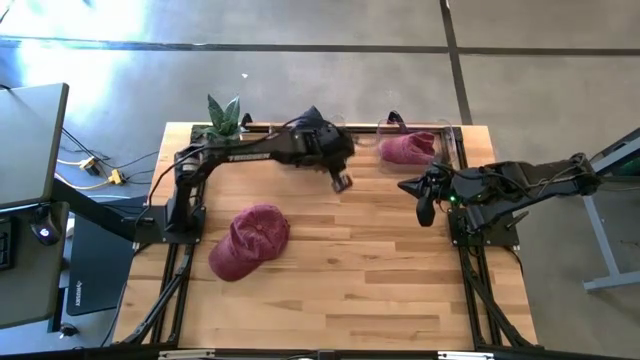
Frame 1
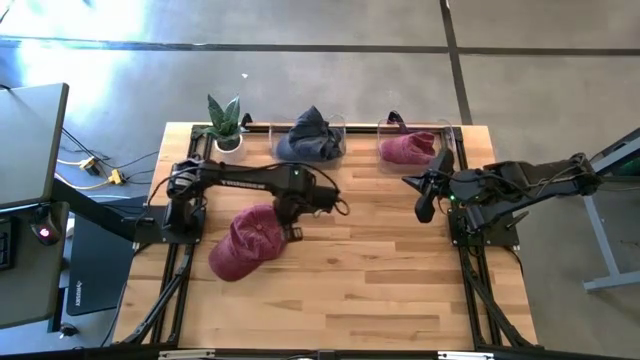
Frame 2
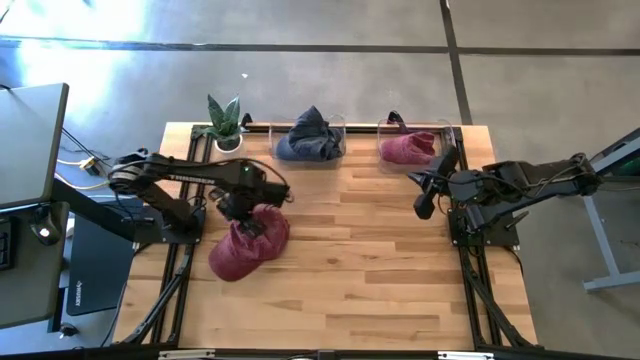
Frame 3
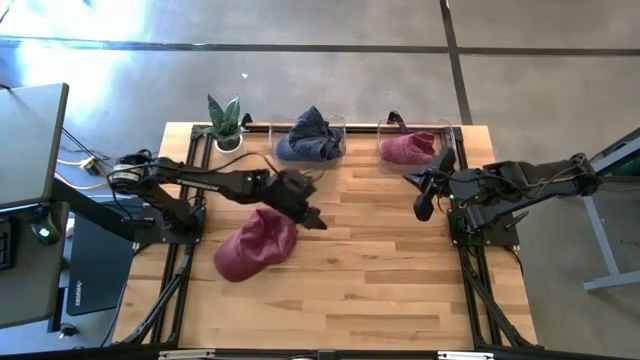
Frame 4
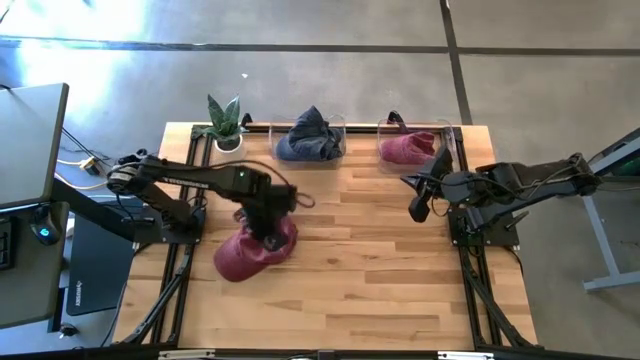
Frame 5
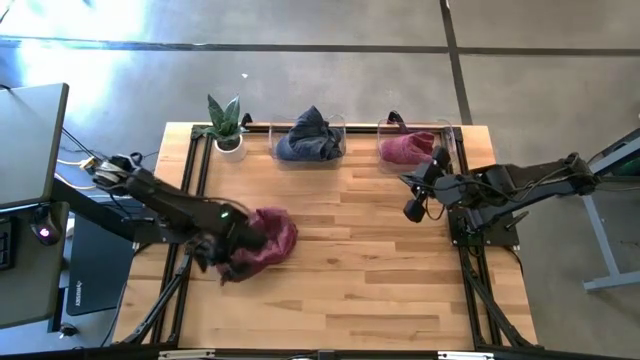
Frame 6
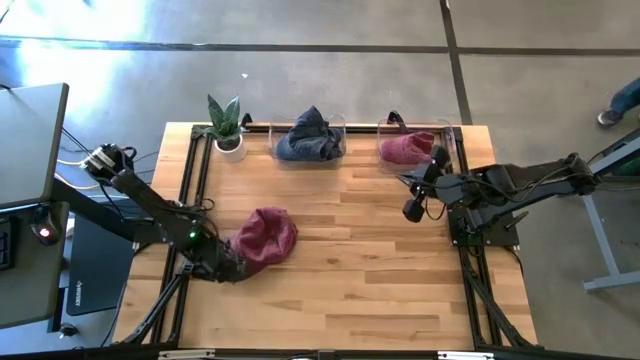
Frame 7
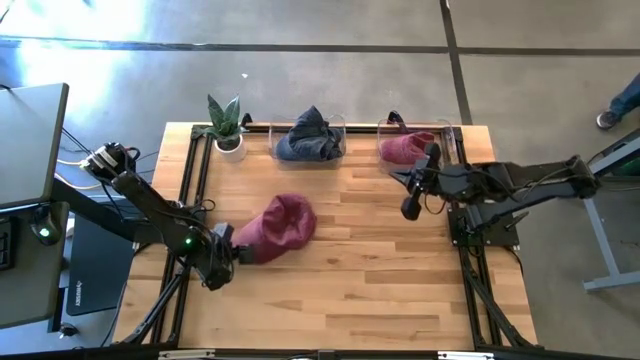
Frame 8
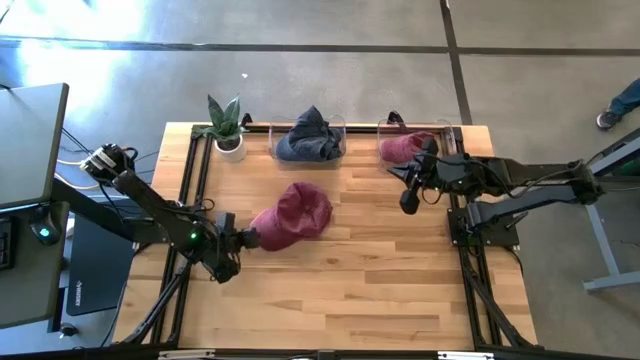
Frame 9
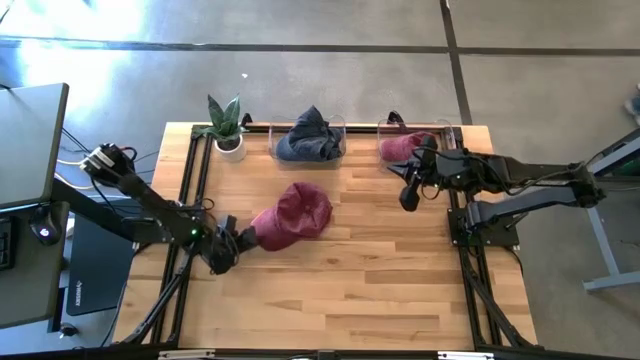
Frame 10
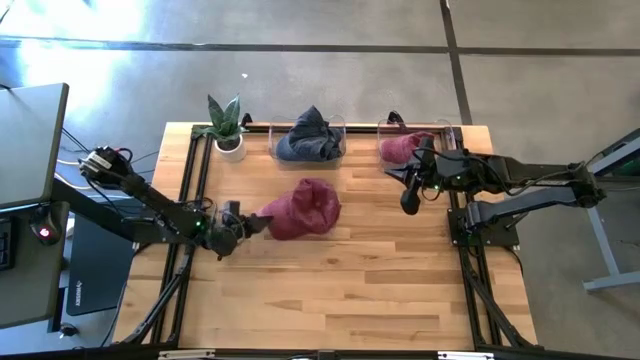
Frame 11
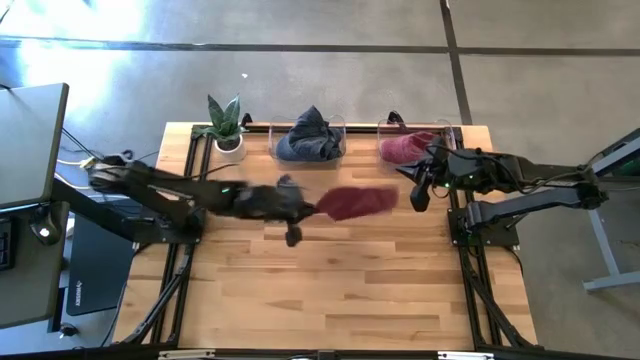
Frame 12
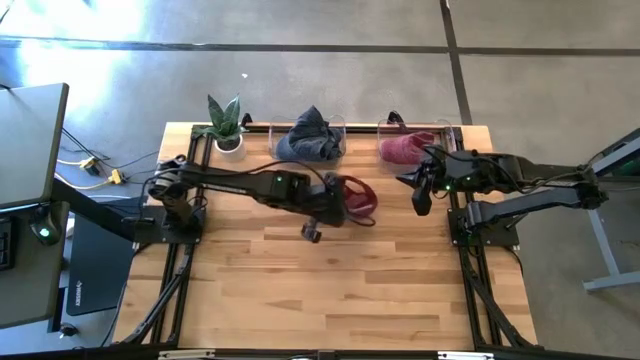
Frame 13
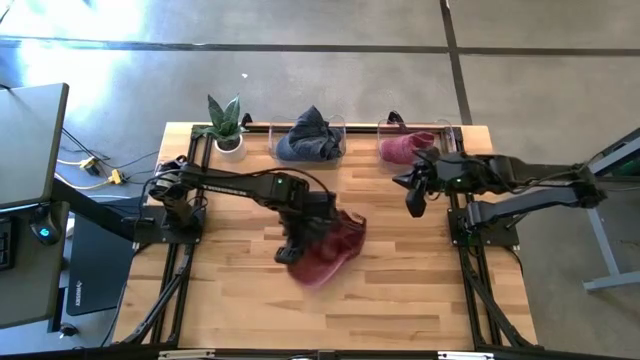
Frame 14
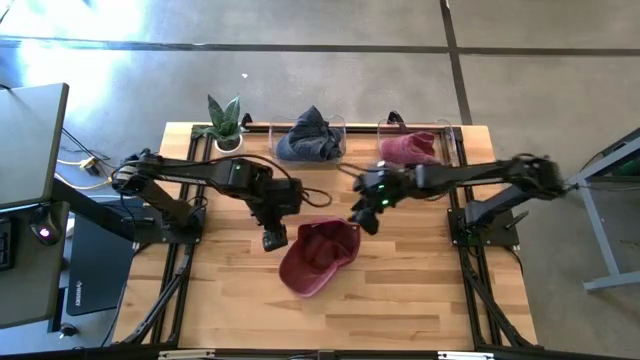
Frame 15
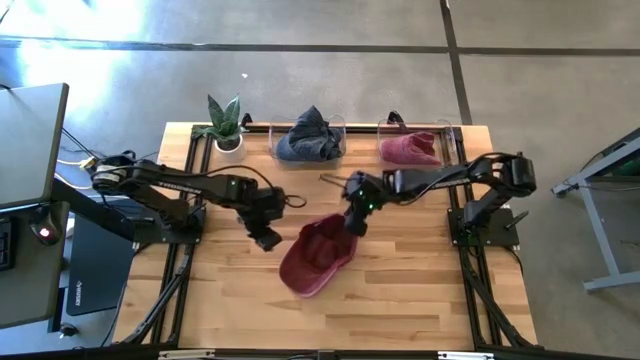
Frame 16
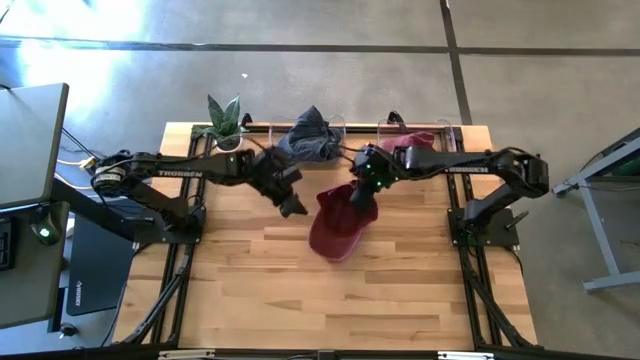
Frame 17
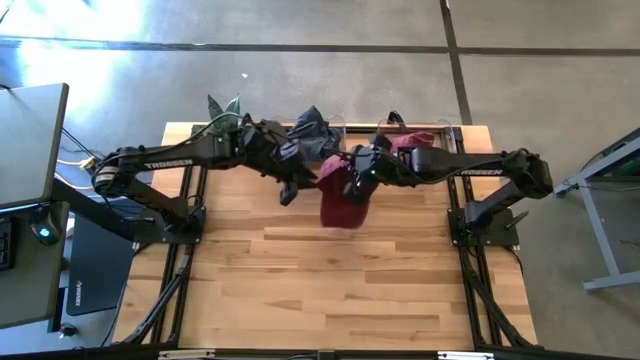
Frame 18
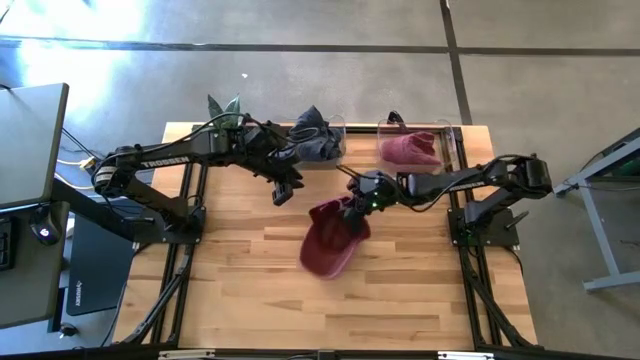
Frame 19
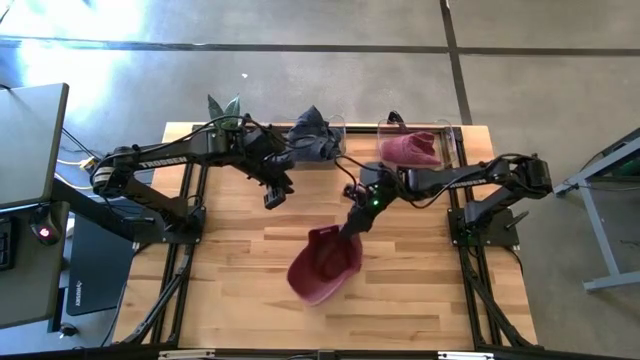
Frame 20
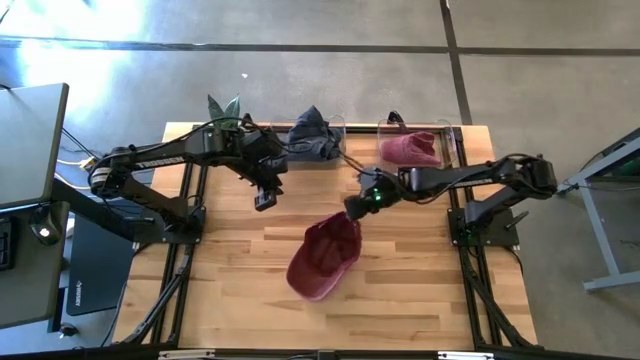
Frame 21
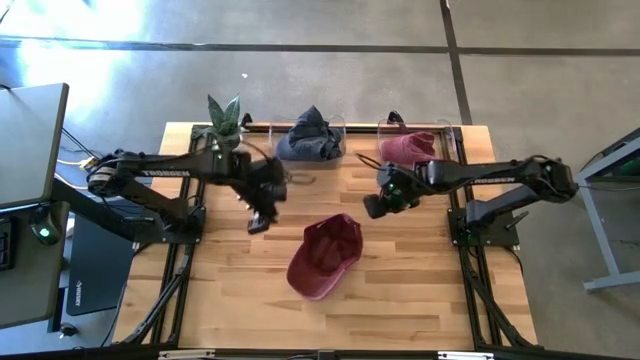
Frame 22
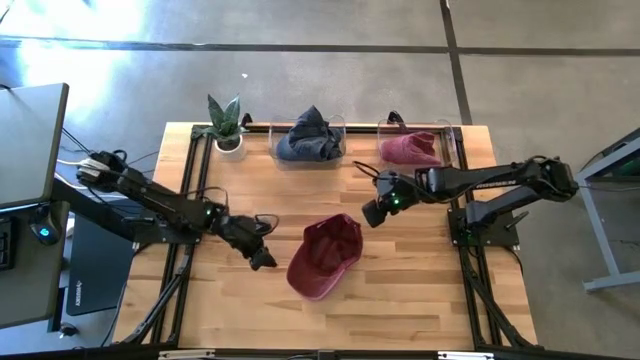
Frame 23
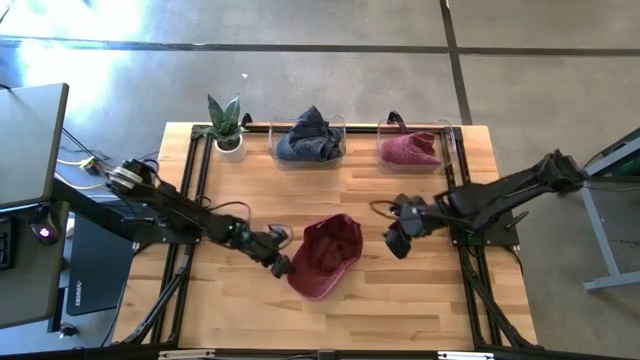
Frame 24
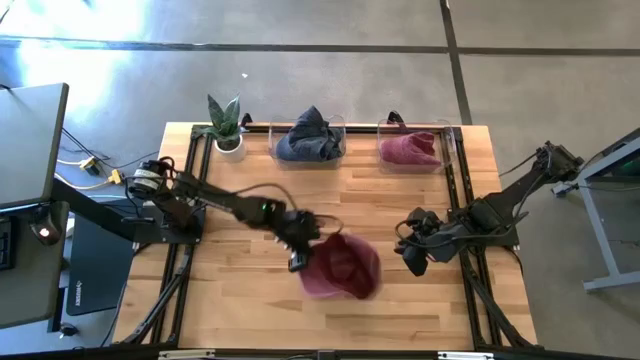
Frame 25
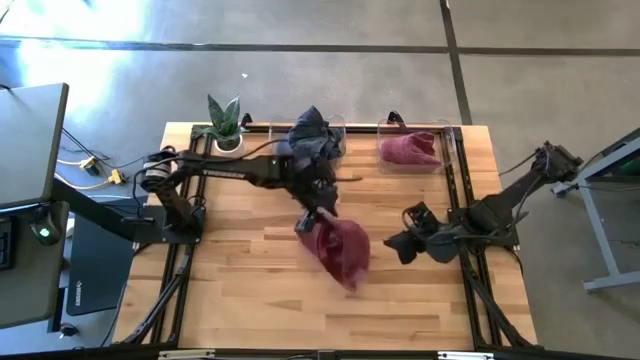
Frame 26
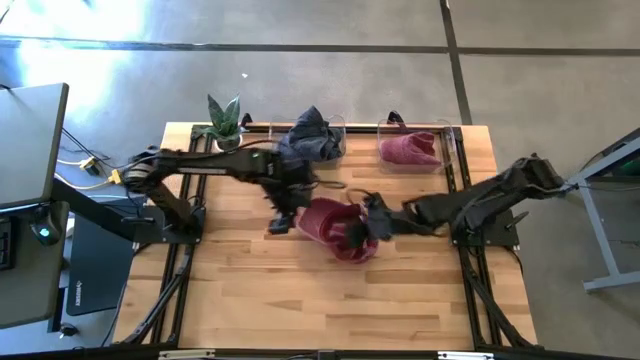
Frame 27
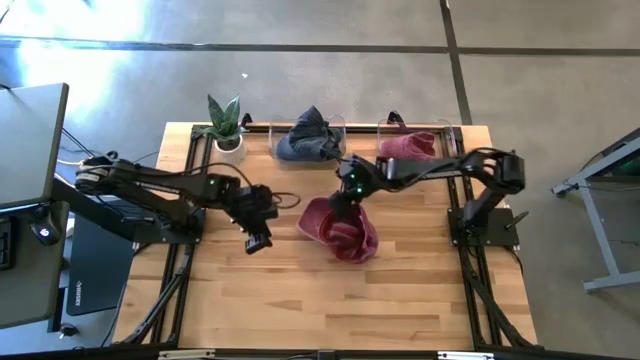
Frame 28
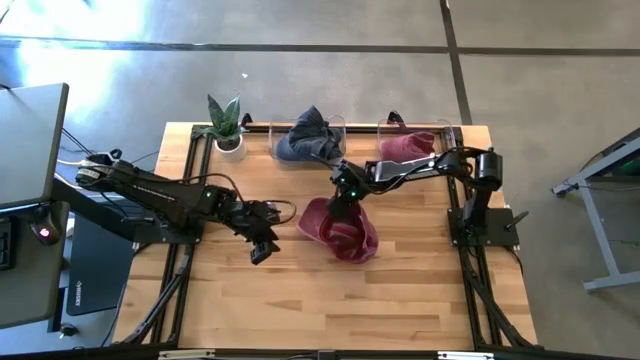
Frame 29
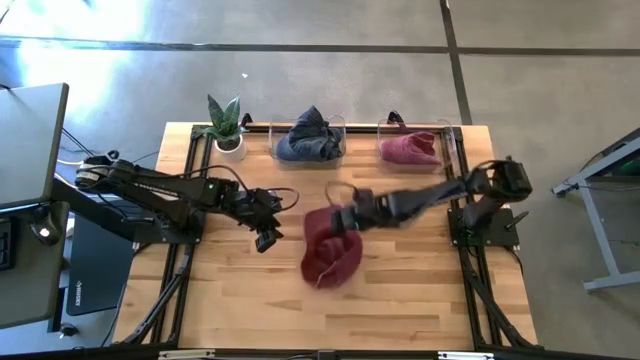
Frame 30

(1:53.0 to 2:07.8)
Task: Pick & Place hat
Put the red cap into the right transparent bin

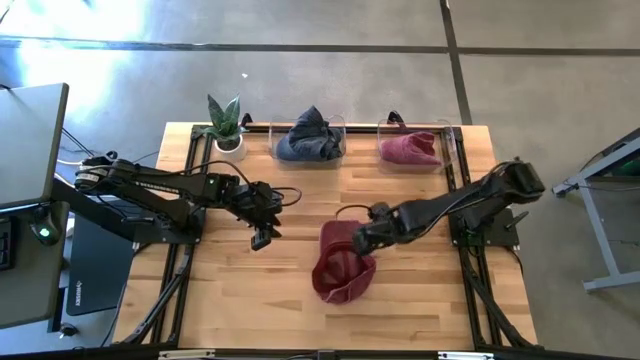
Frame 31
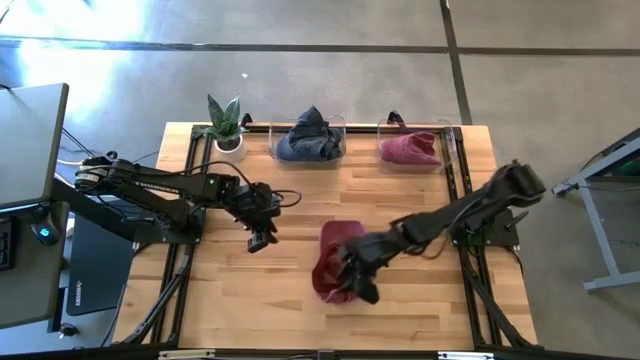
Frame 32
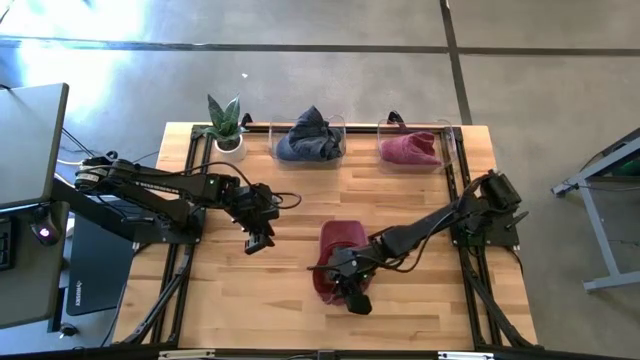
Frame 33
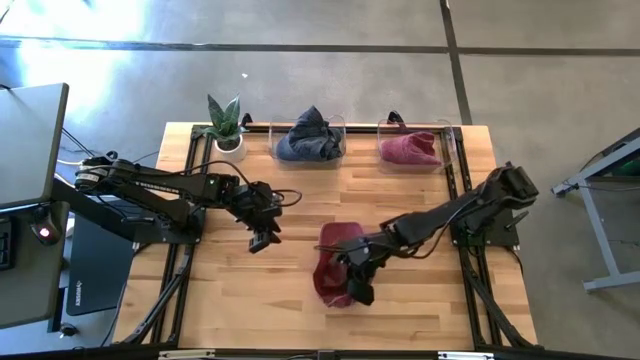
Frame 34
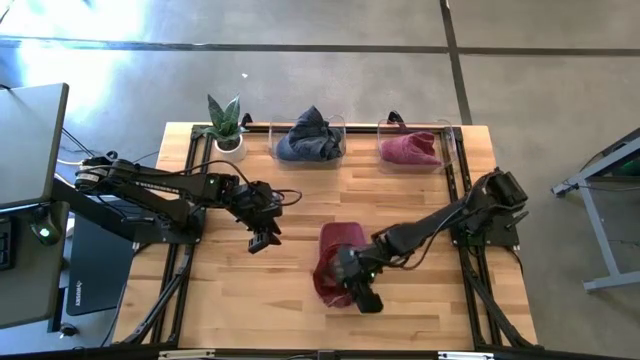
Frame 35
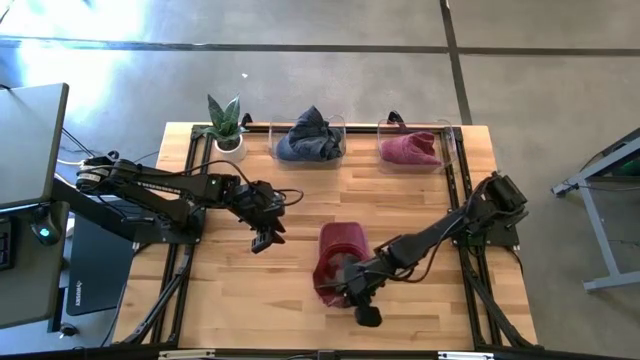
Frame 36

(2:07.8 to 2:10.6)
Put the red cap into the right transparent bin

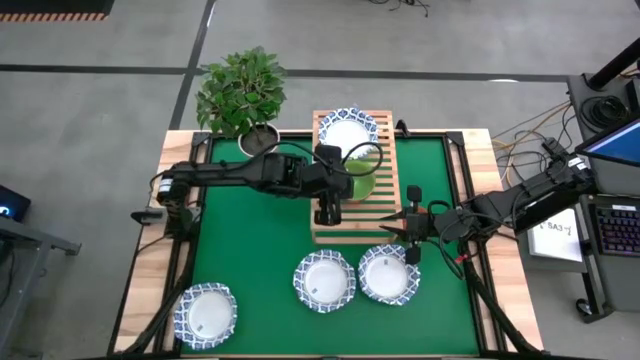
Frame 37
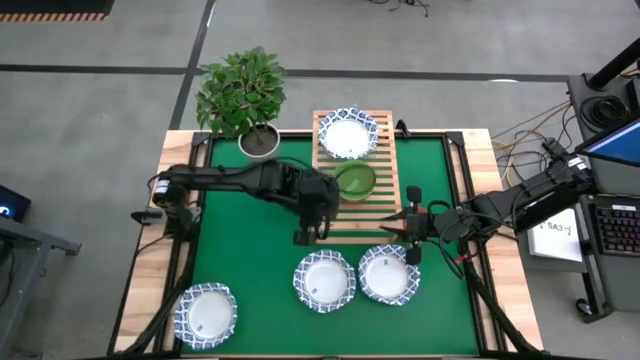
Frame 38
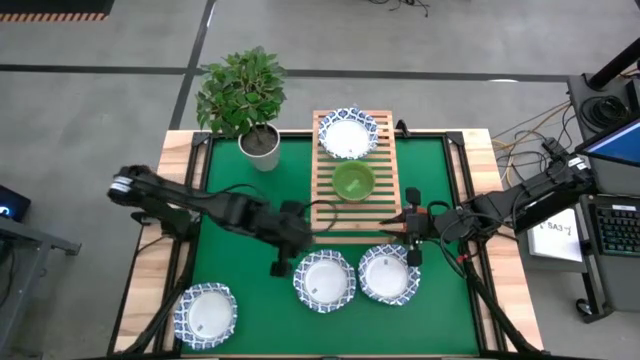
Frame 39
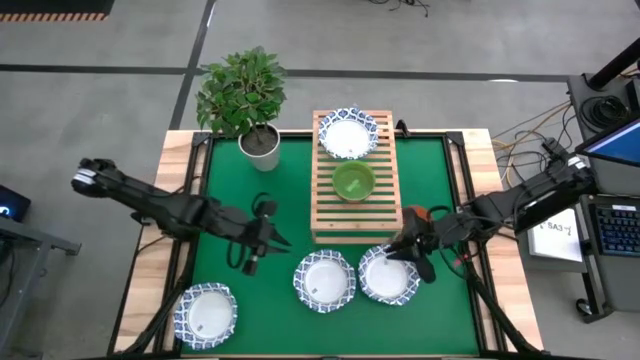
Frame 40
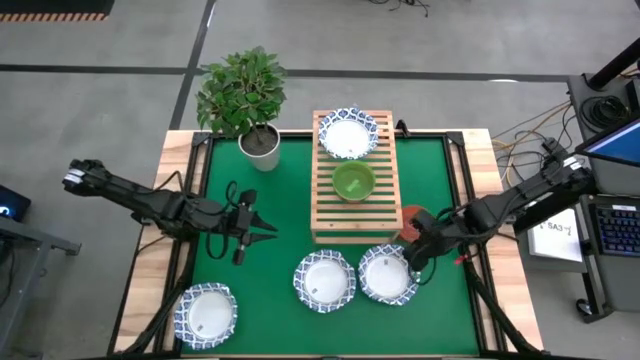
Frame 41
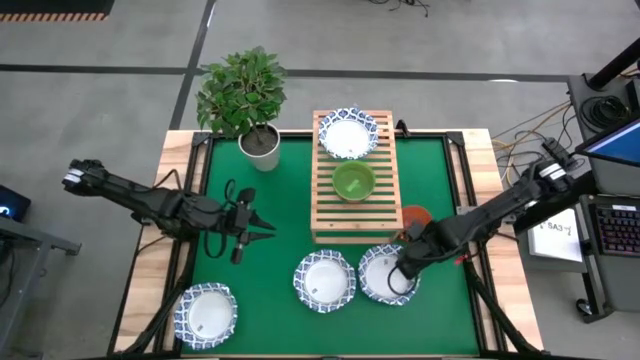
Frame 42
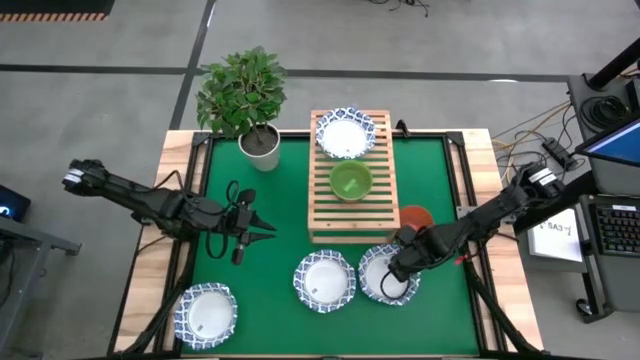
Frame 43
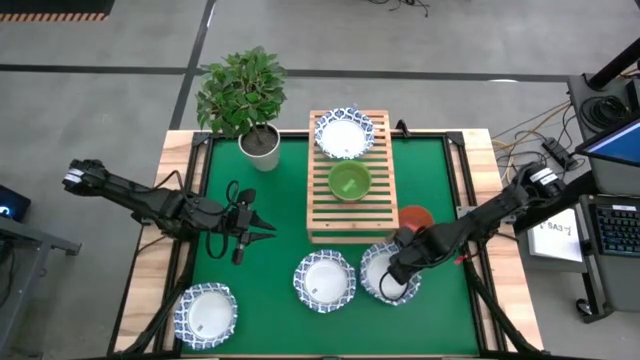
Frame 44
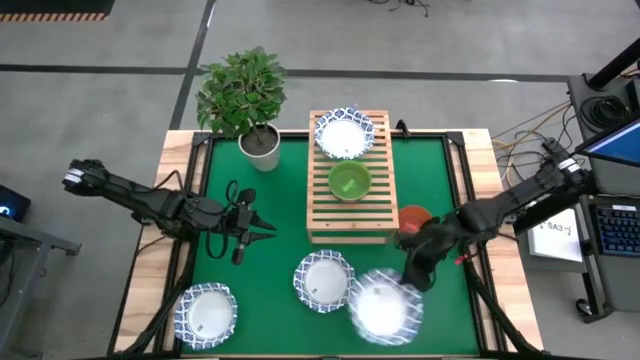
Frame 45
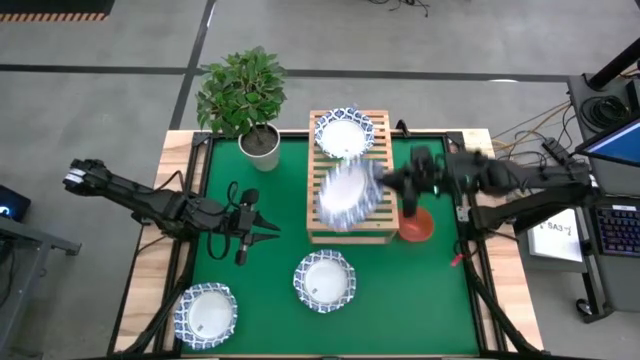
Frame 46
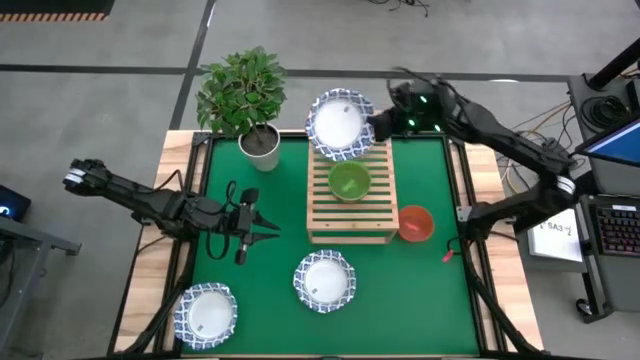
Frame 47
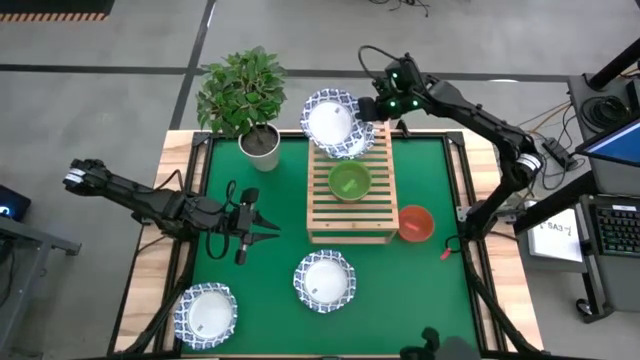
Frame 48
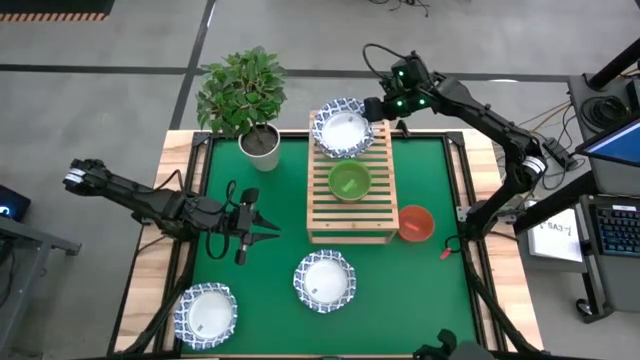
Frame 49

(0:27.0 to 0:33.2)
Task: Place and stack bowls onto a shelf
Stack the white patterned bowl on top of the other white patterned bowl on the shelf
